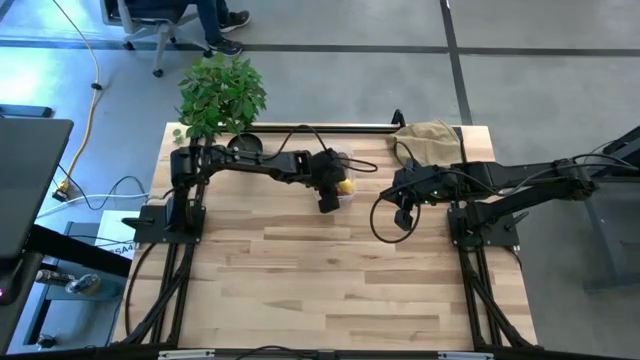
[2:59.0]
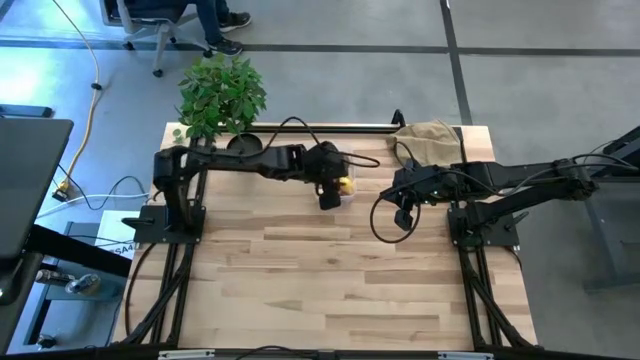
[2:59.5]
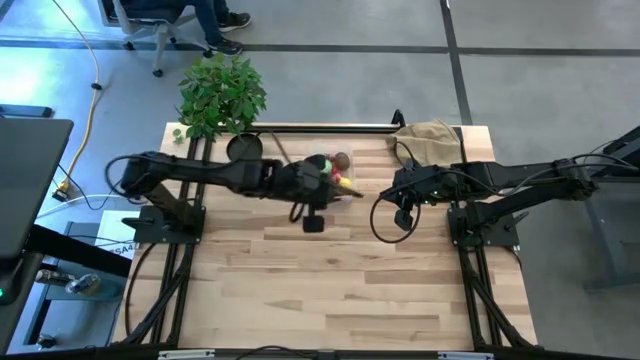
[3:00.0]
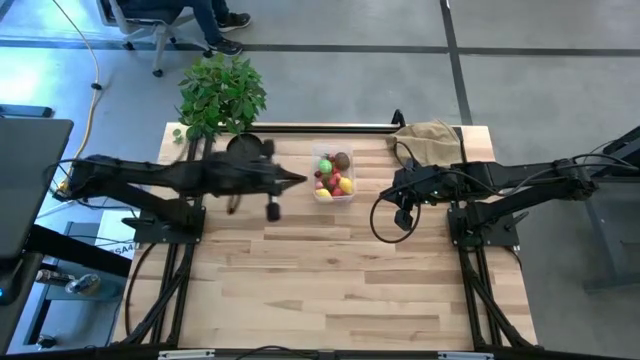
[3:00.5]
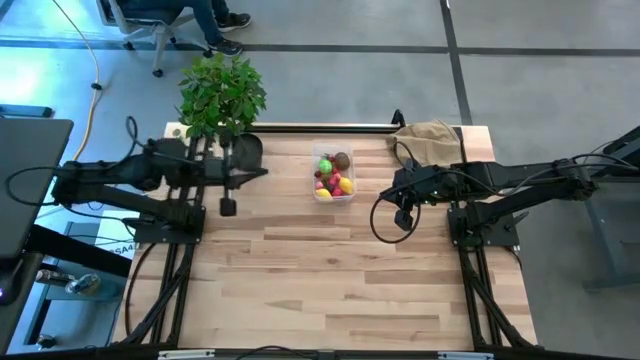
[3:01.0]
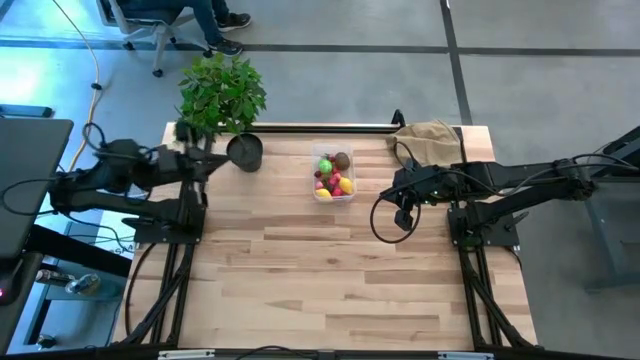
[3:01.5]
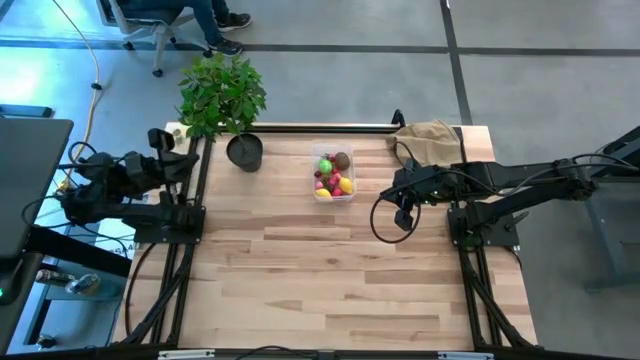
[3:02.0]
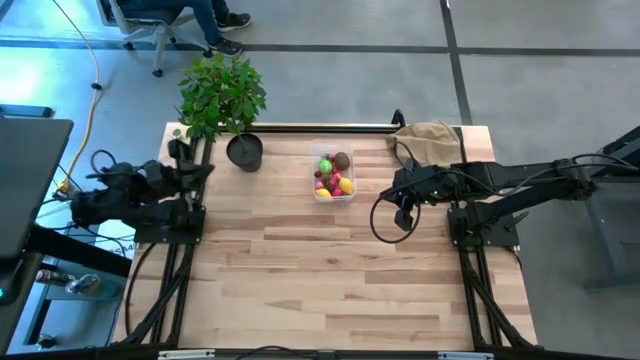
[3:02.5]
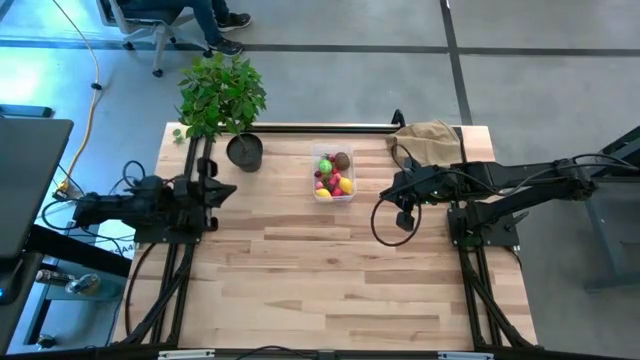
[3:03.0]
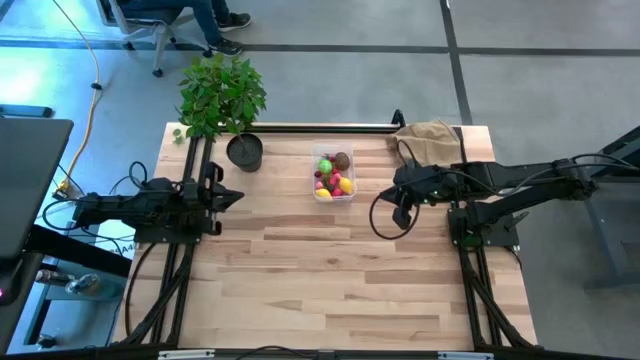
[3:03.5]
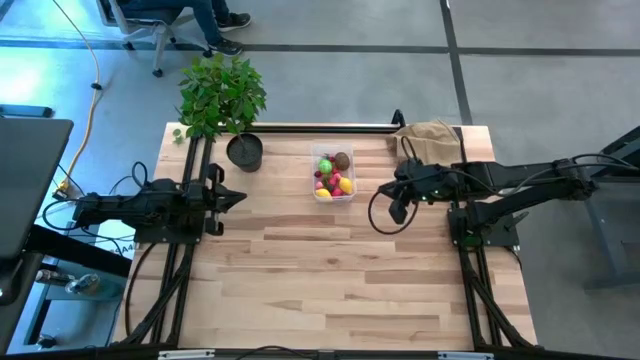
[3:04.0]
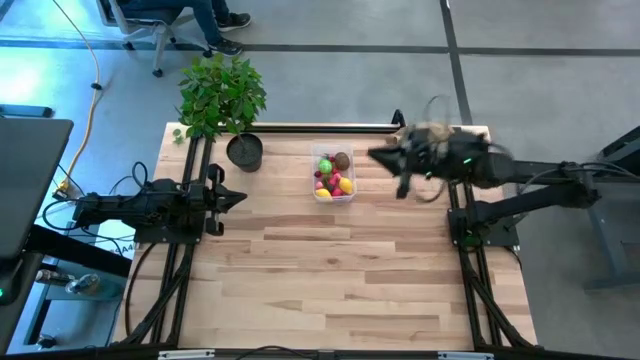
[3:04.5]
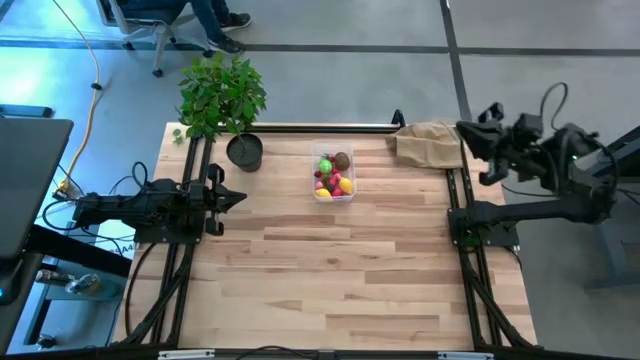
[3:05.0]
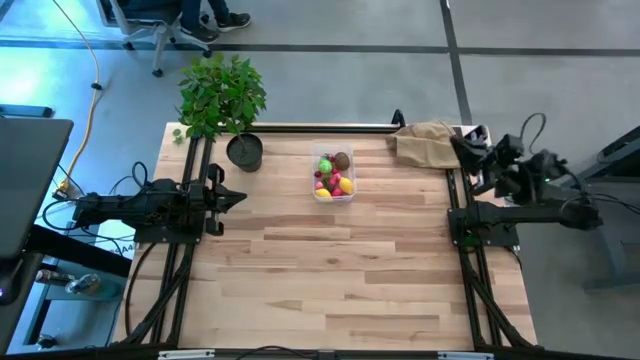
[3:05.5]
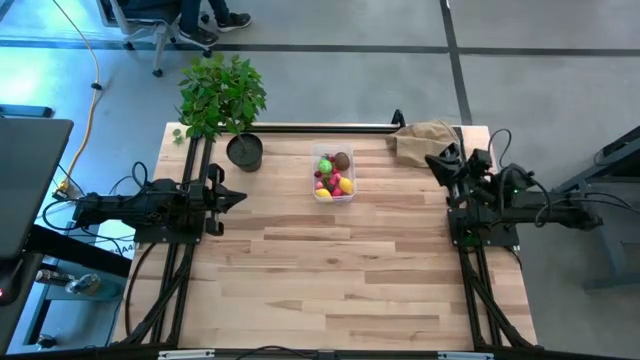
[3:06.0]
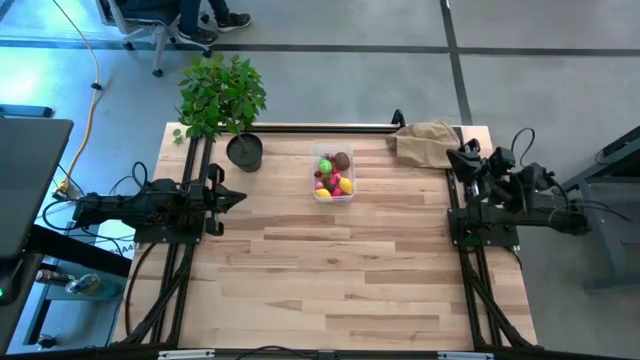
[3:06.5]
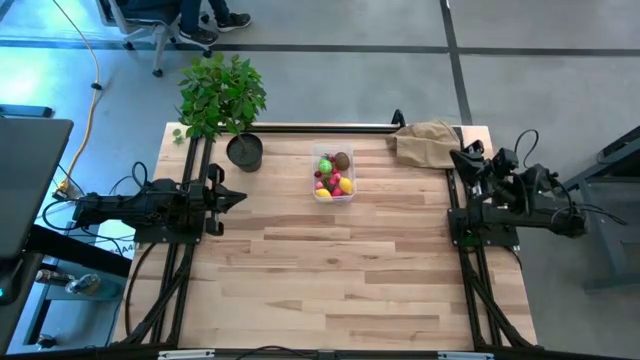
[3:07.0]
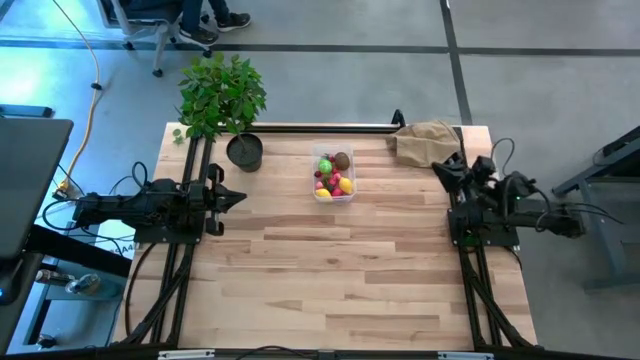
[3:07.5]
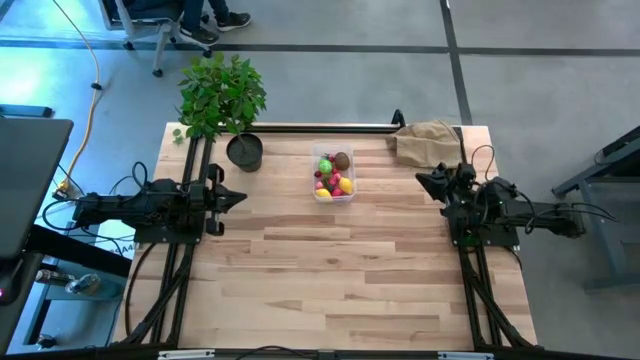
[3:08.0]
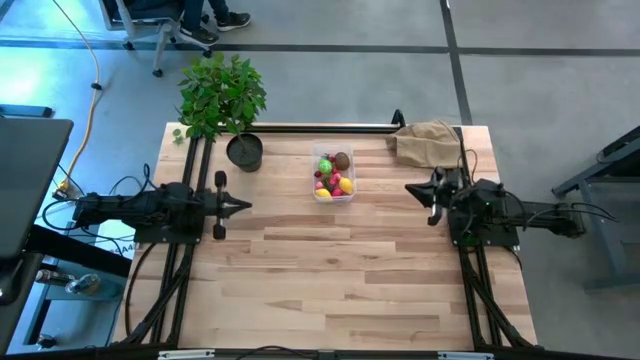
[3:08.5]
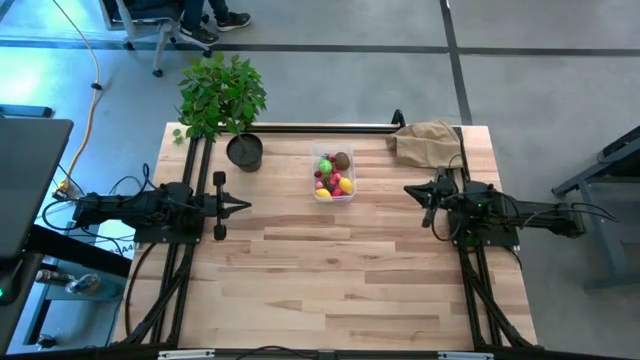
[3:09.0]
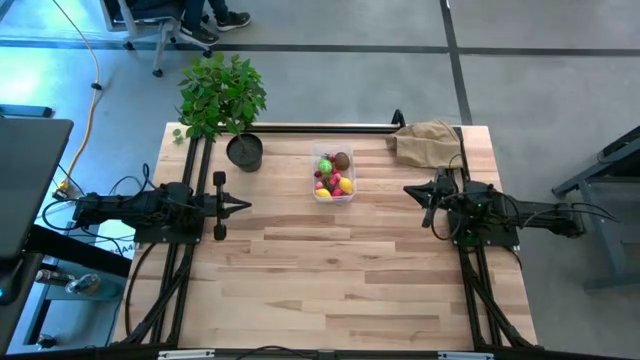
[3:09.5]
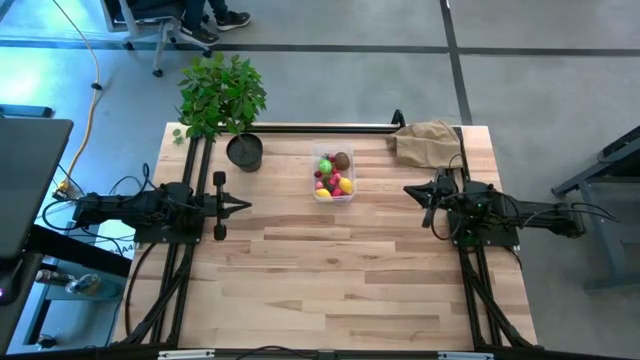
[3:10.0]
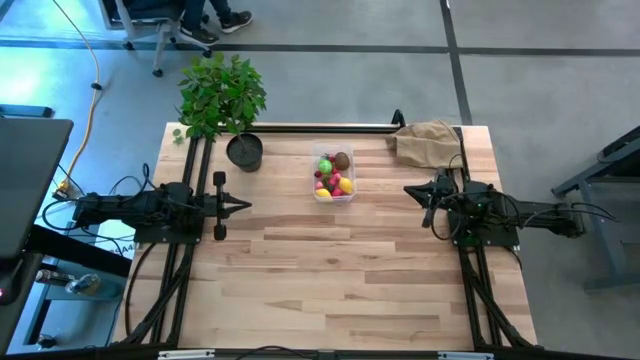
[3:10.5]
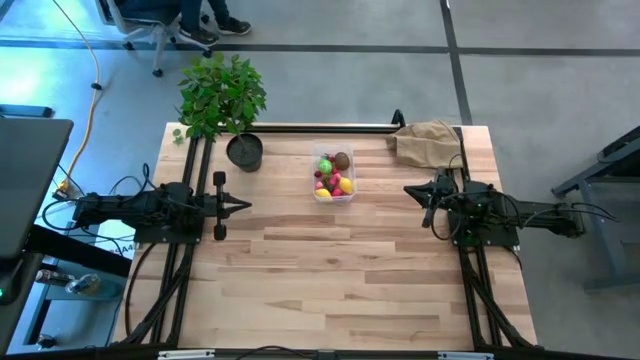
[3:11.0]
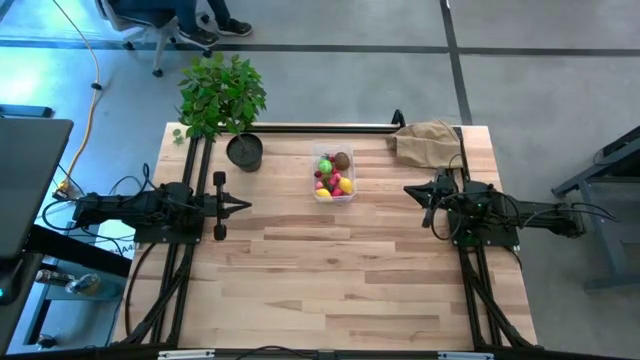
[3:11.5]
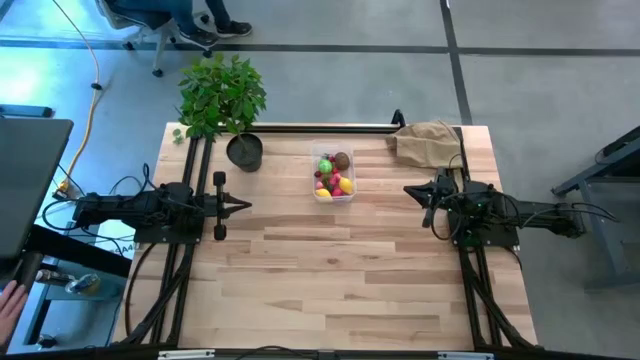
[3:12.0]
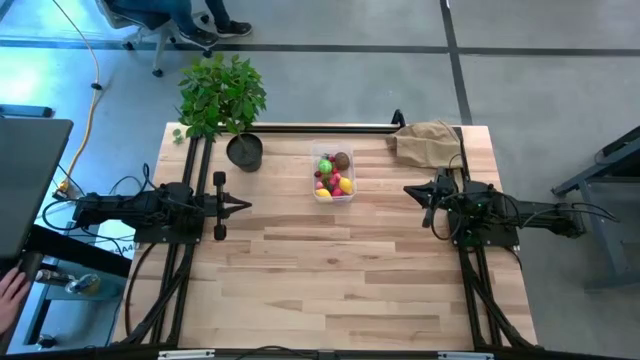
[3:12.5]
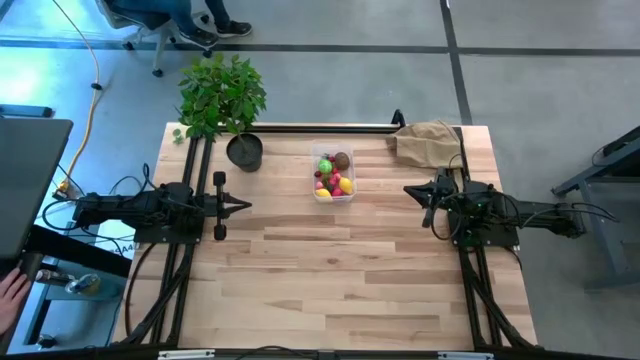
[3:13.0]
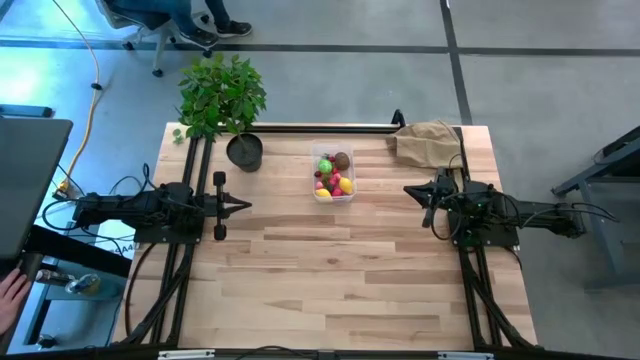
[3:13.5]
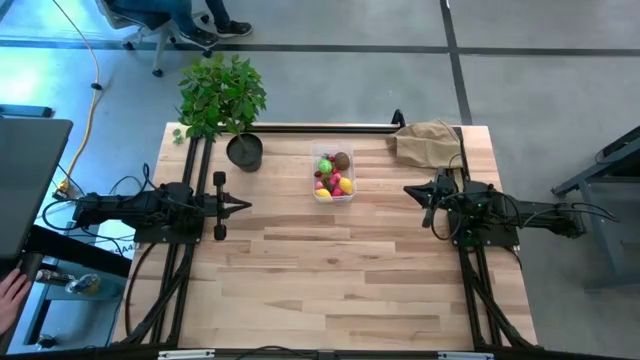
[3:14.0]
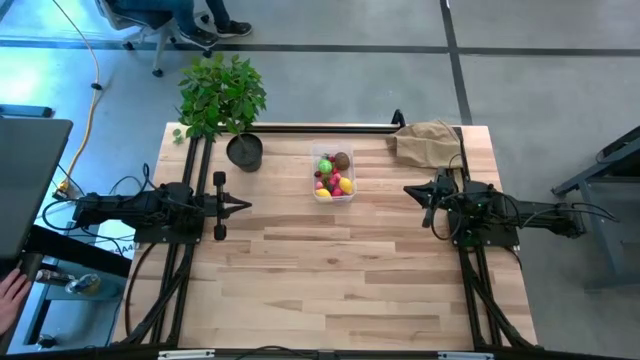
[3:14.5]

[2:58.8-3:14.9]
Task: Pick and placing Produce into tupperware
Return to Home Position

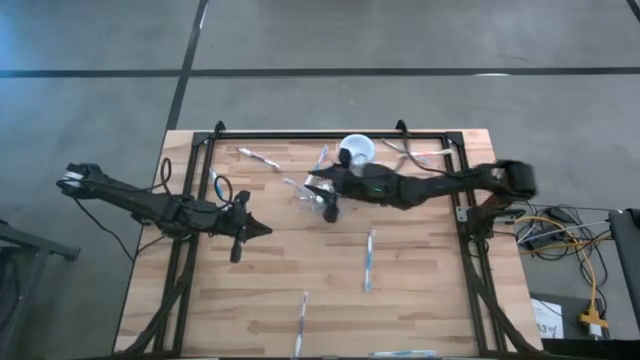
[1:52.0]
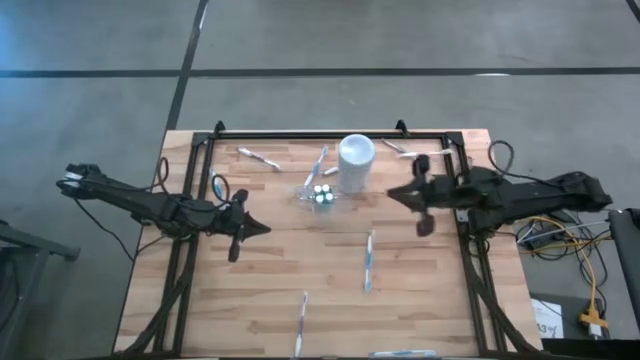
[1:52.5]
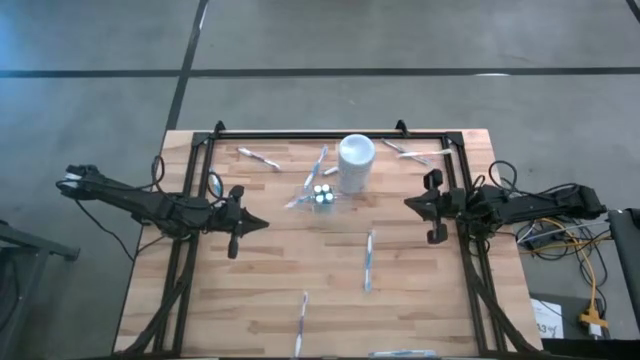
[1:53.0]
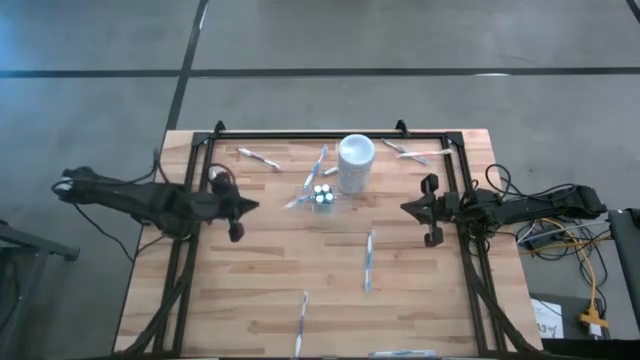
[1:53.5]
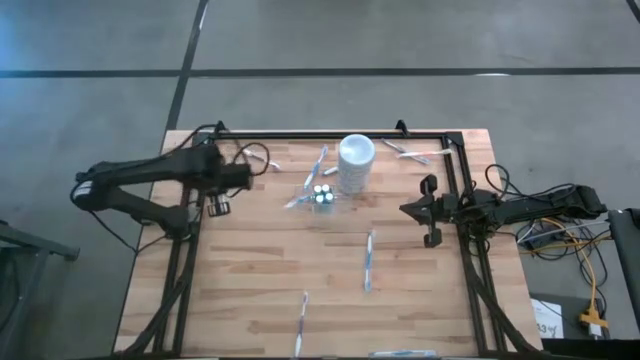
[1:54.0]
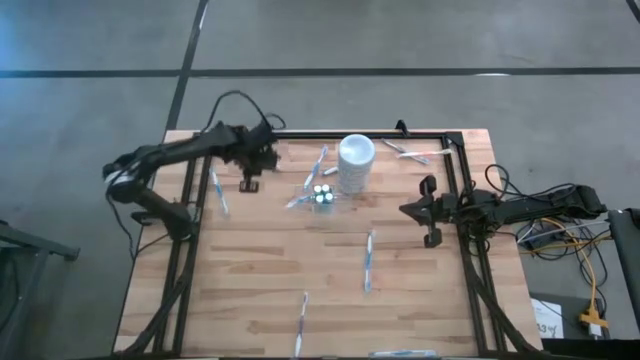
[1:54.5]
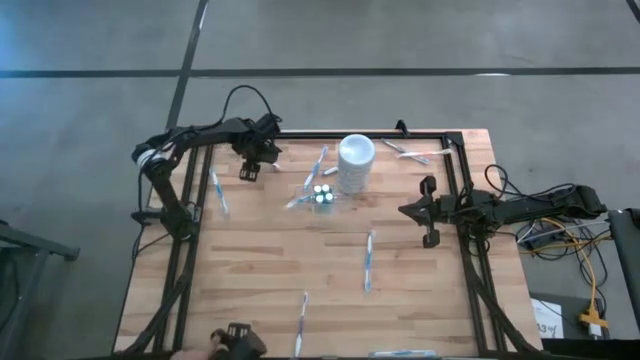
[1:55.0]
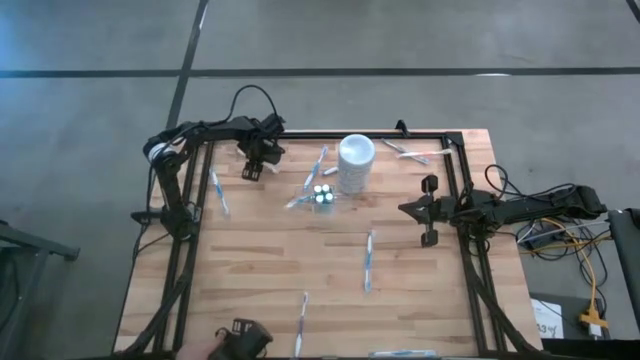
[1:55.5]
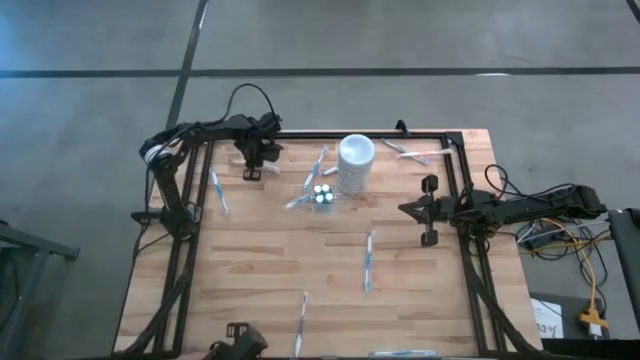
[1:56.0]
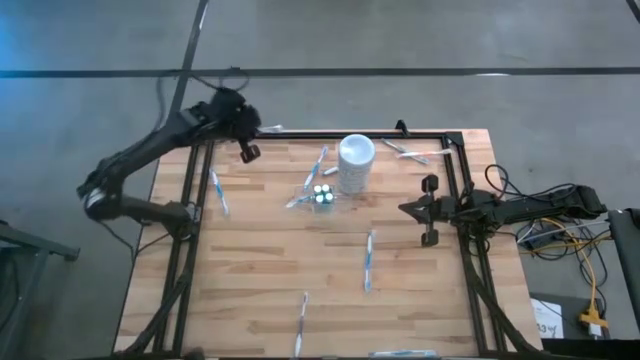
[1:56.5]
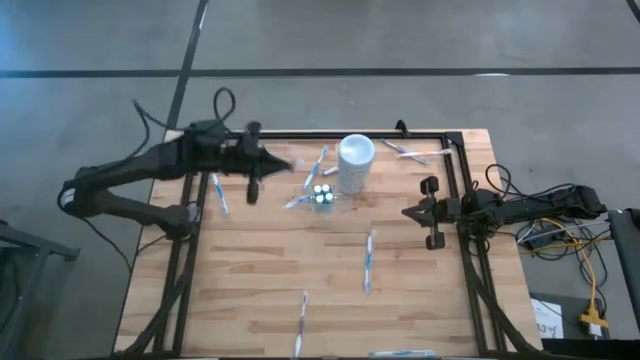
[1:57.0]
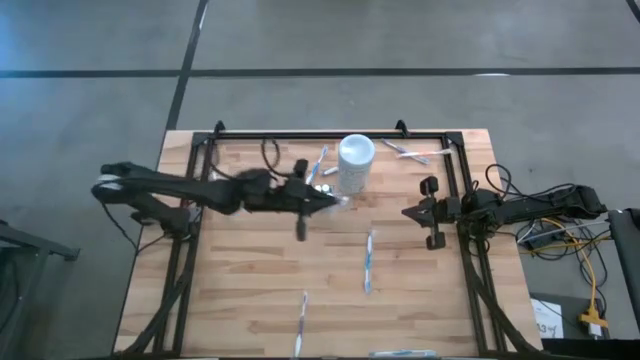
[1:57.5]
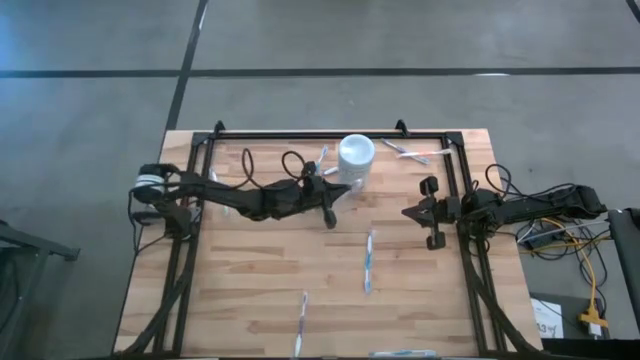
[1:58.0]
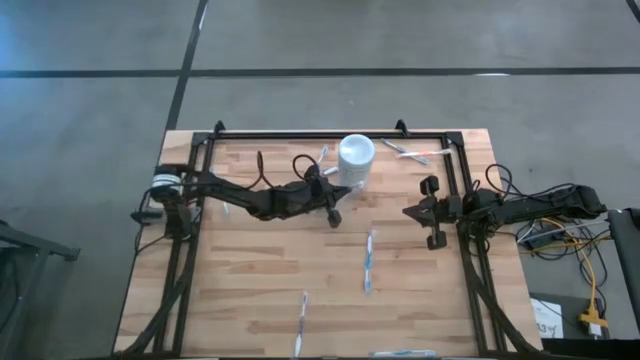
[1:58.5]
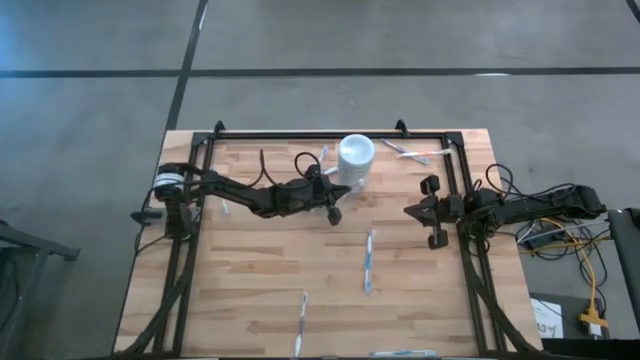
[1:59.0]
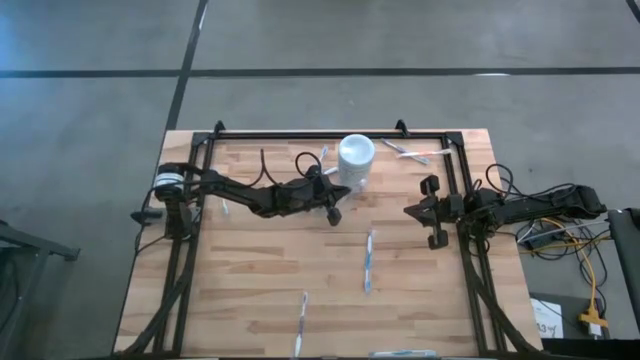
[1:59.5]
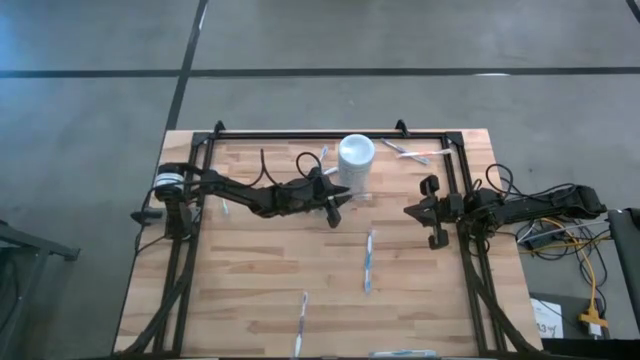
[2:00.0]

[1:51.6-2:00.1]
Task: Pick & Place toothbrushing station
Put the violet toothbrush into the transparent organizer
